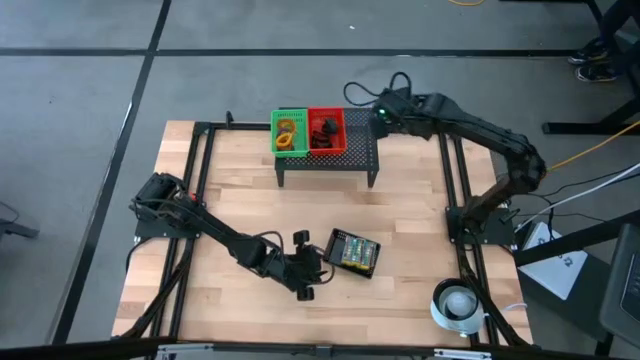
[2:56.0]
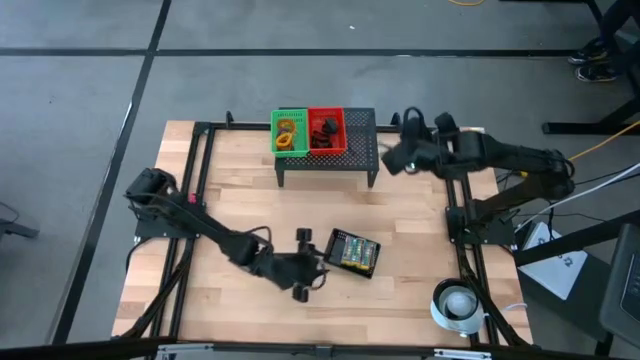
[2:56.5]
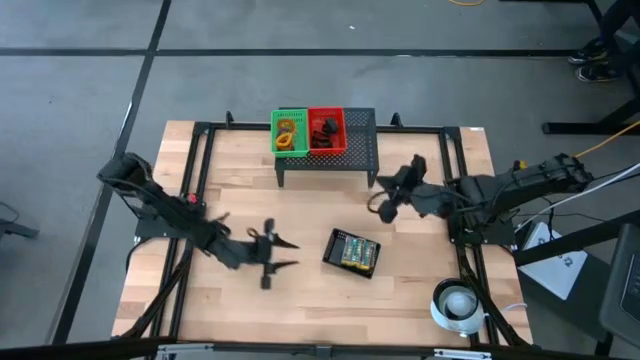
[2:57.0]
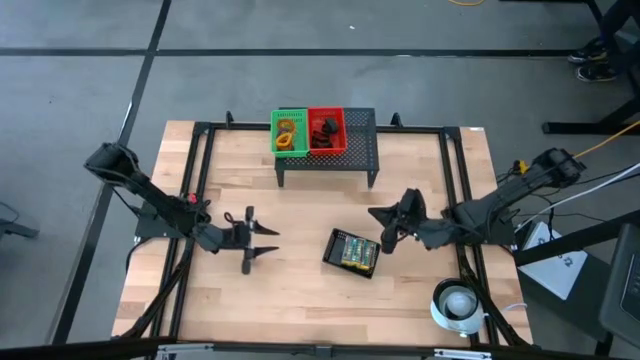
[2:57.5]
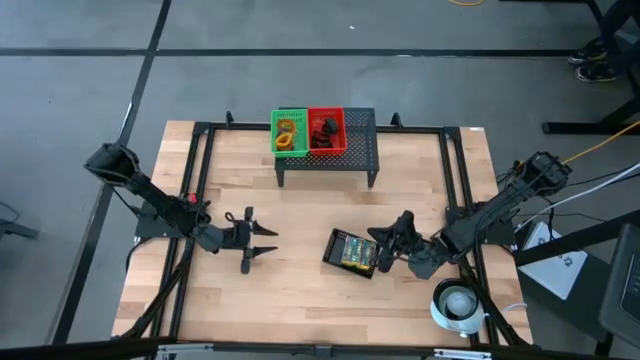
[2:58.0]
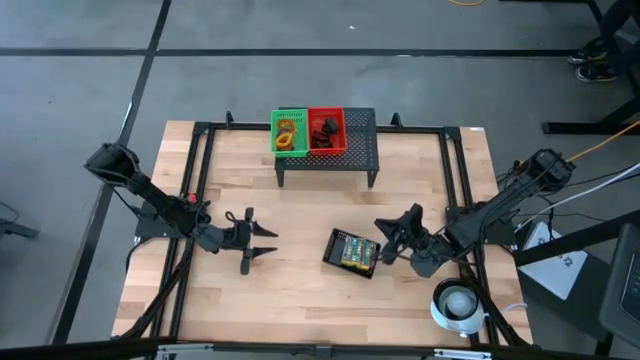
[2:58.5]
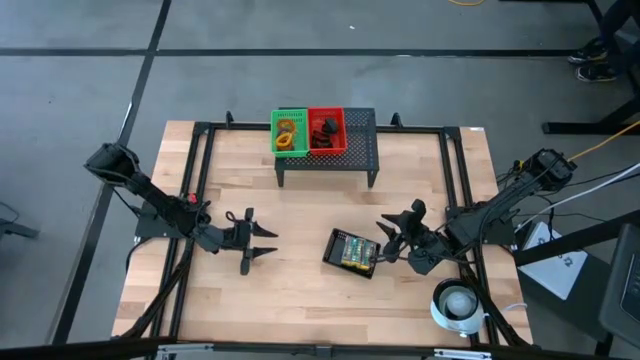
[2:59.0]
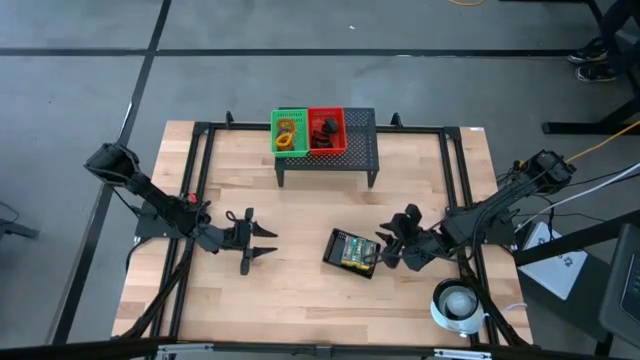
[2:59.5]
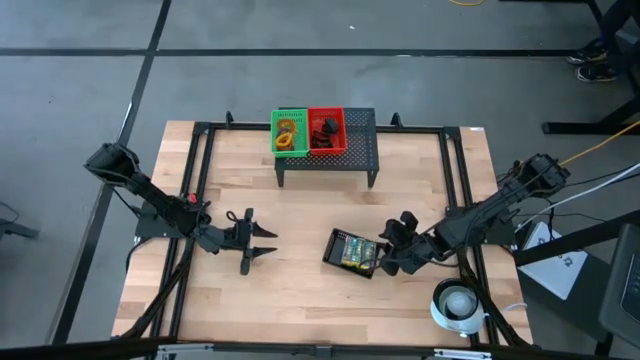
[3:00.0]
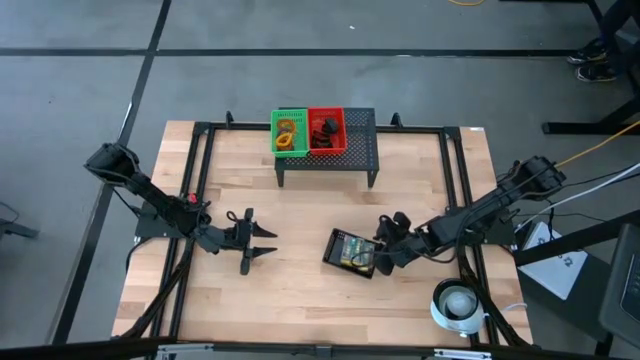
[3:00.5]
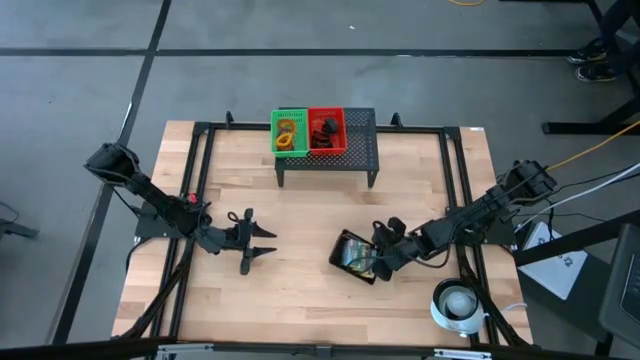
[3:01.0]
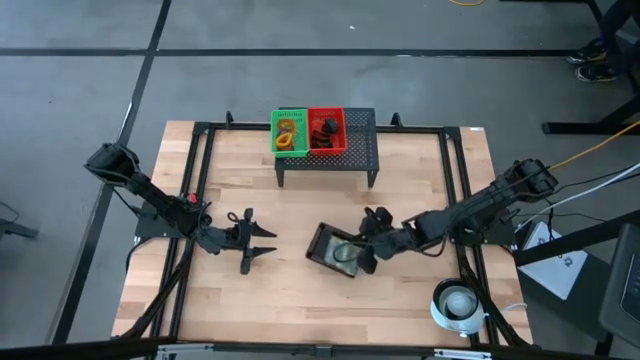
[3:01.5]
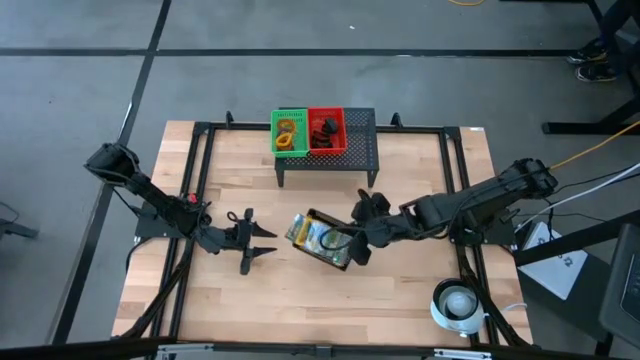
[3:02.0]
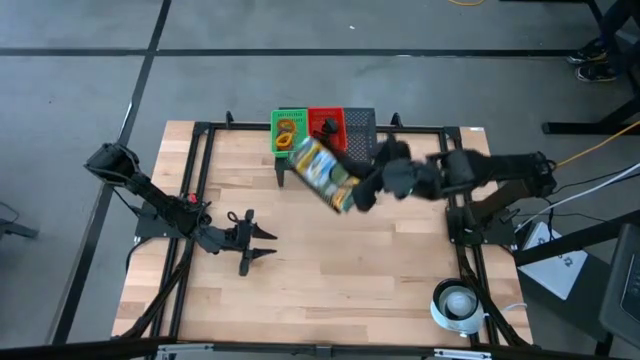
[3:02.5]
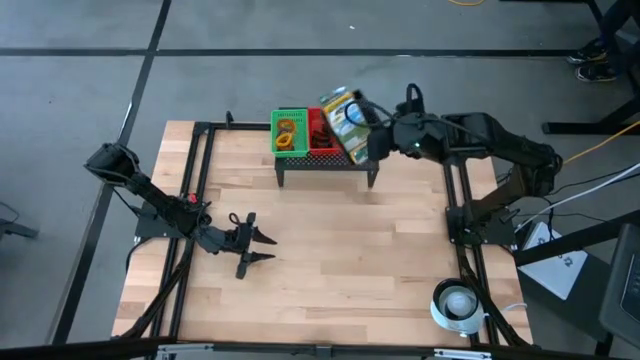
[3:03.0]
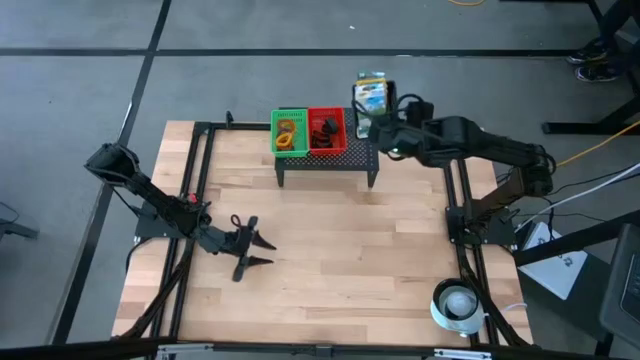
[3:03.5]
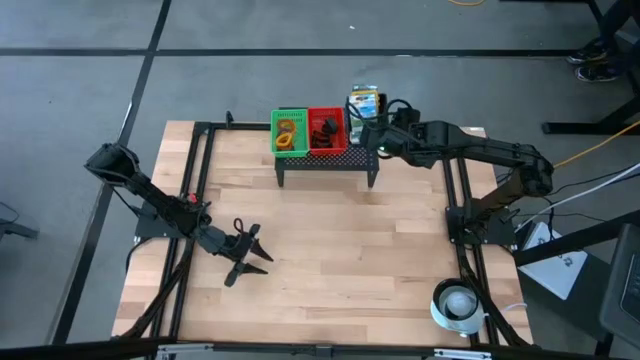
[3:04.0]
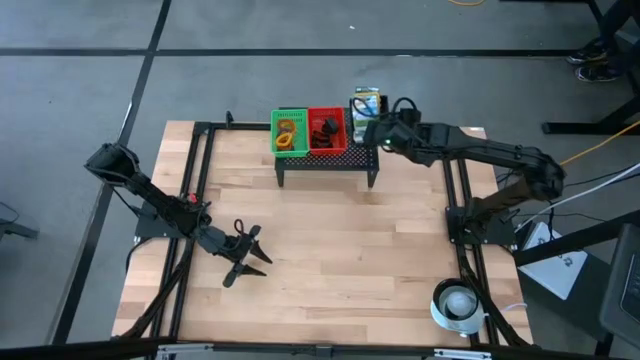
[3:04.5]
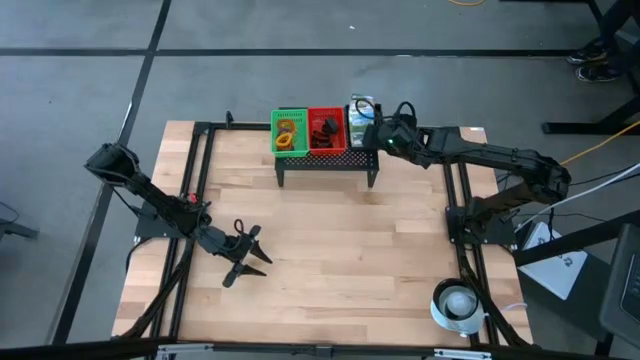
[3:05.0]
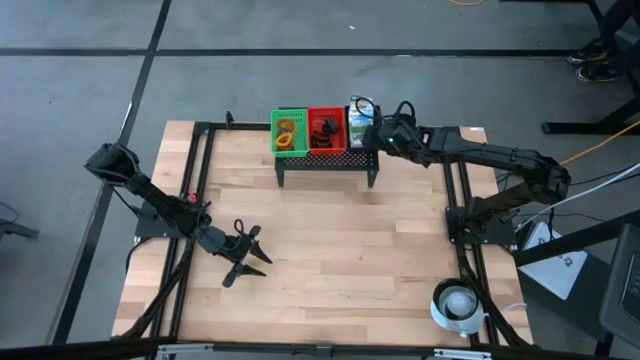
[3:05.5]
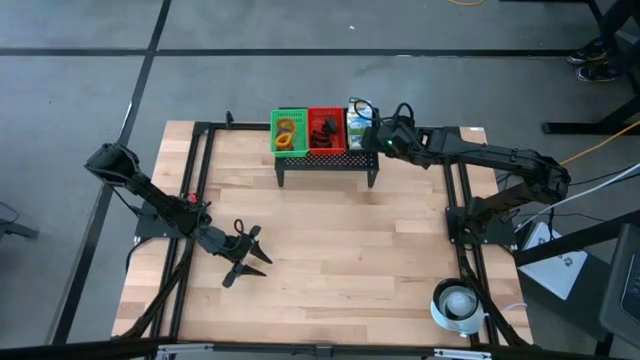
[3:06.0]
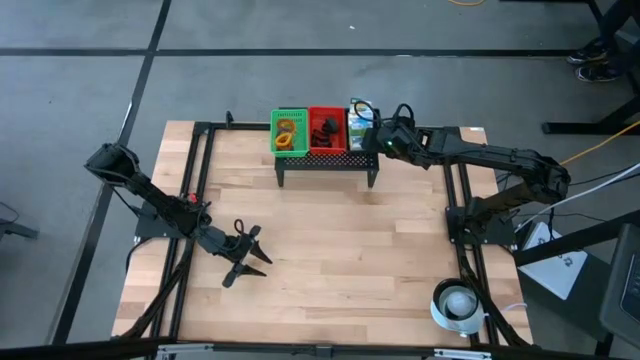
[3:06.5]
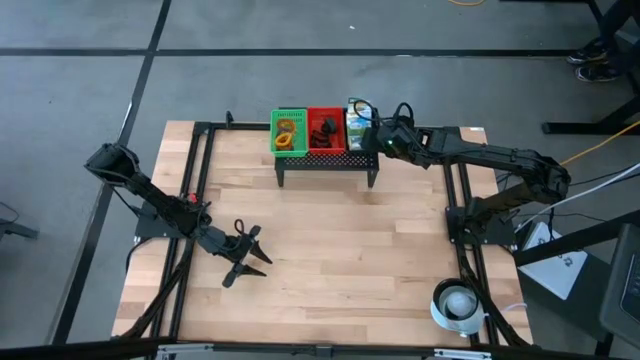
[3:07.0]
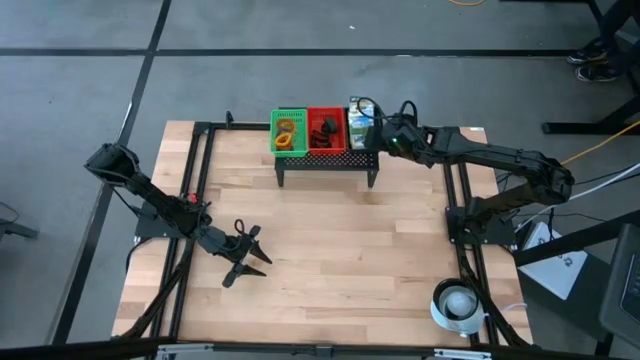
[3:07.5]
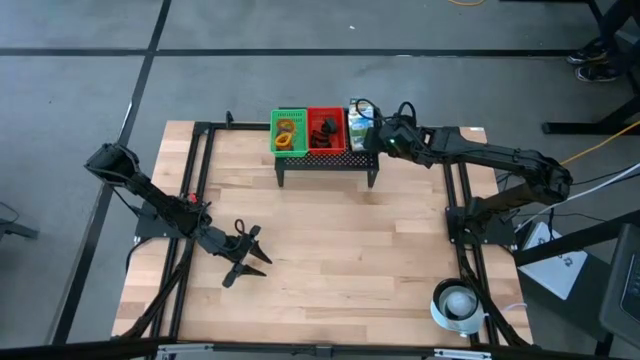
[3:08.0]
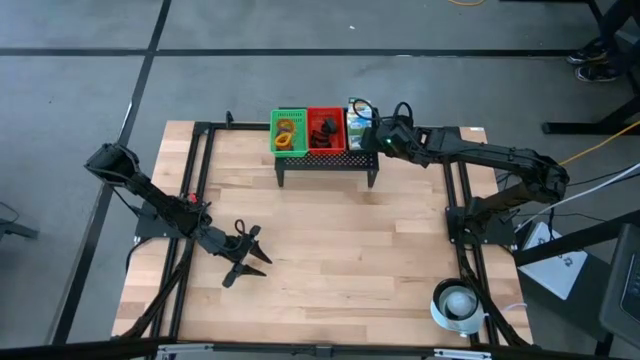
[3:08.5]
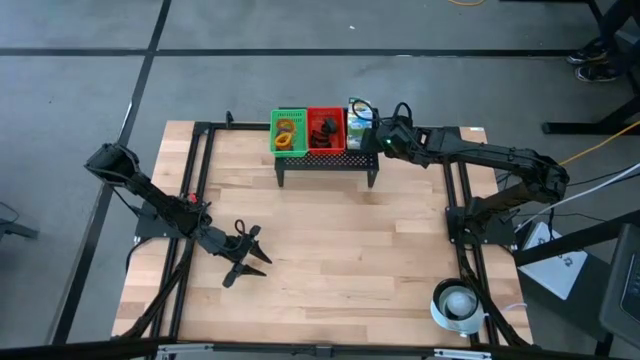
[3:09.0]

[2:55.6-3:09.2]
Task: Pick & Place Office Desk Supplies
Put the black bin on the shelf

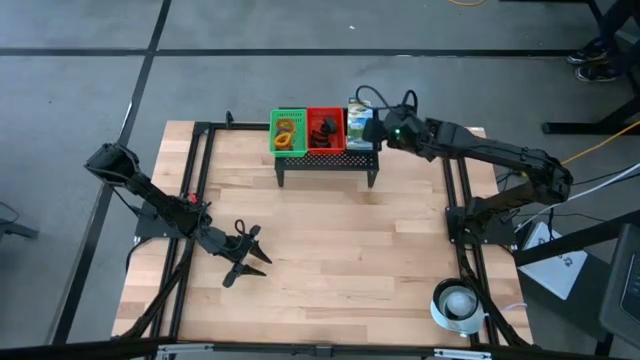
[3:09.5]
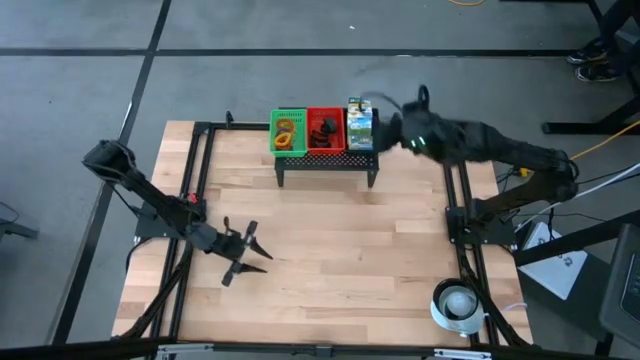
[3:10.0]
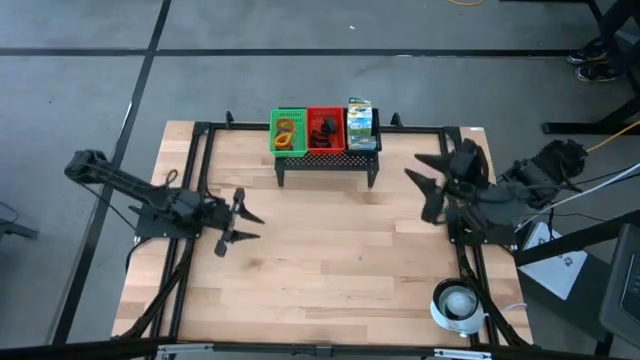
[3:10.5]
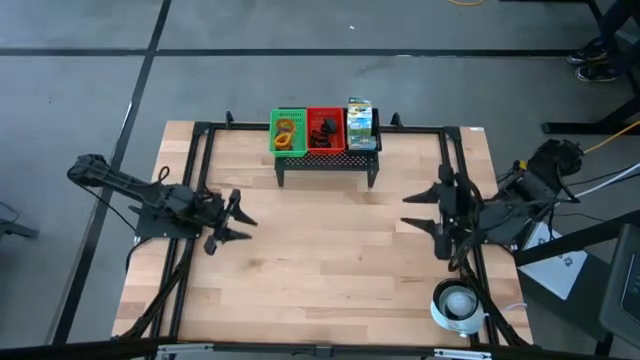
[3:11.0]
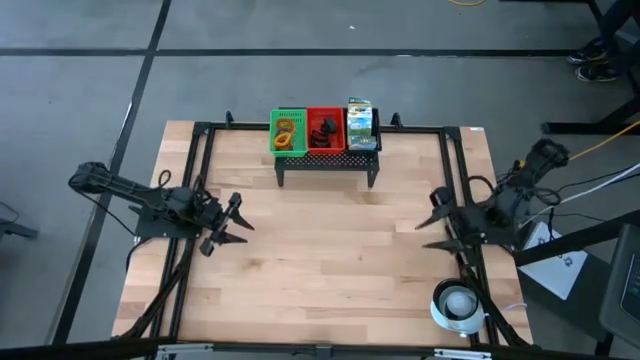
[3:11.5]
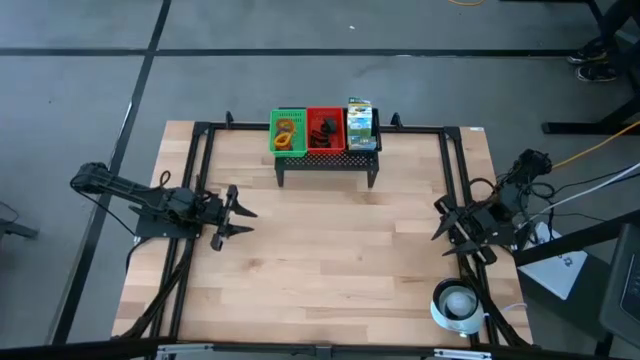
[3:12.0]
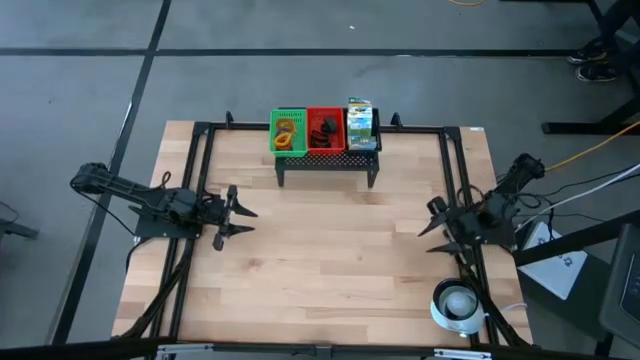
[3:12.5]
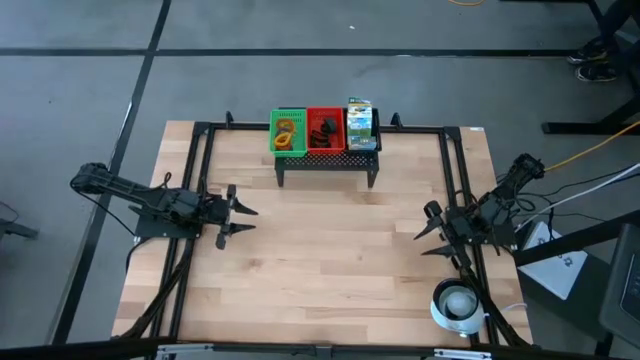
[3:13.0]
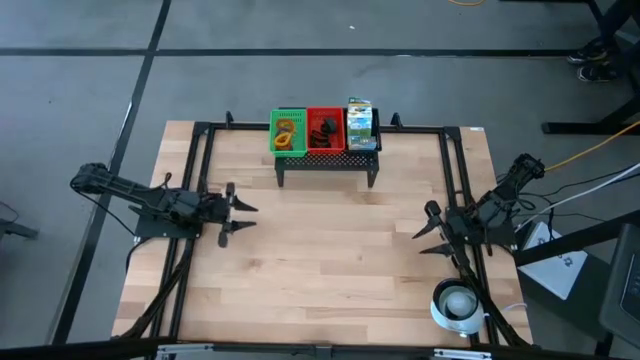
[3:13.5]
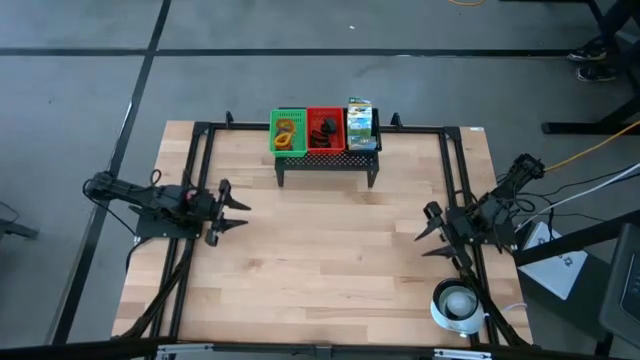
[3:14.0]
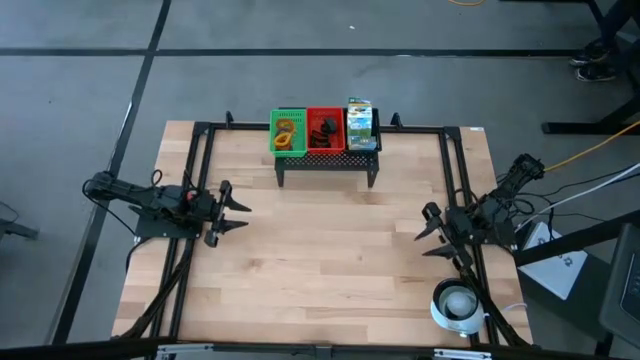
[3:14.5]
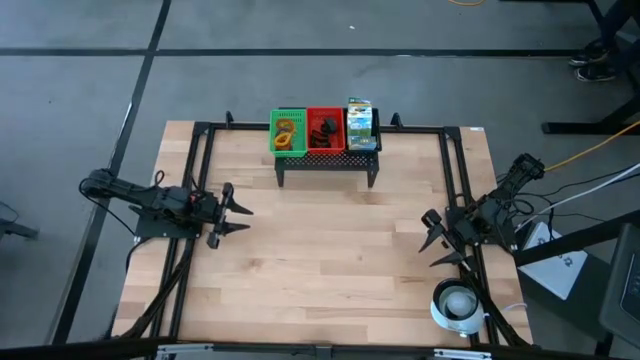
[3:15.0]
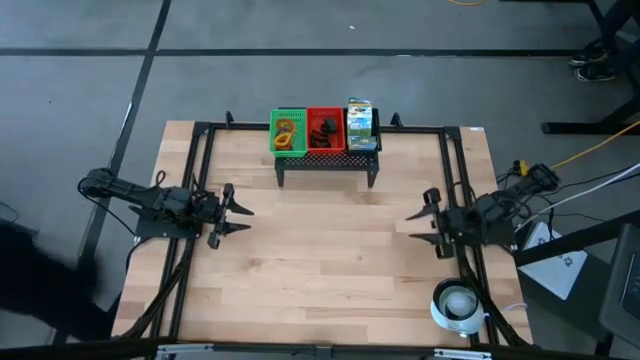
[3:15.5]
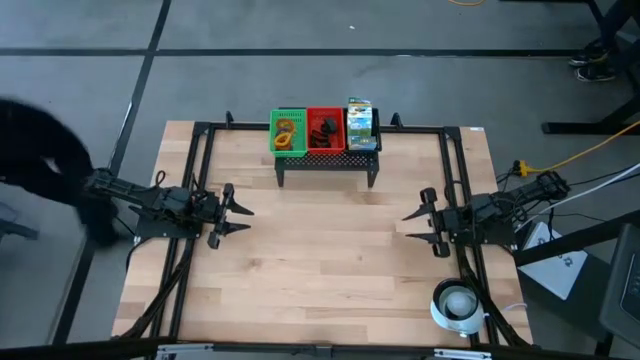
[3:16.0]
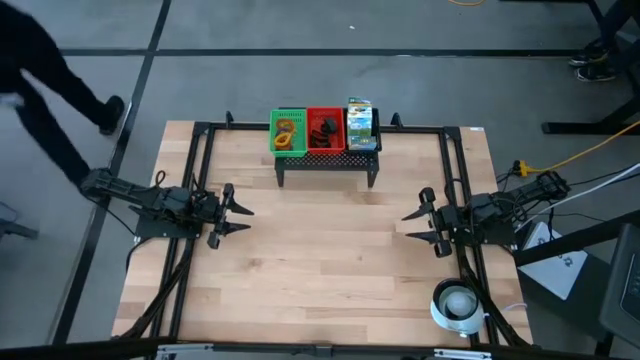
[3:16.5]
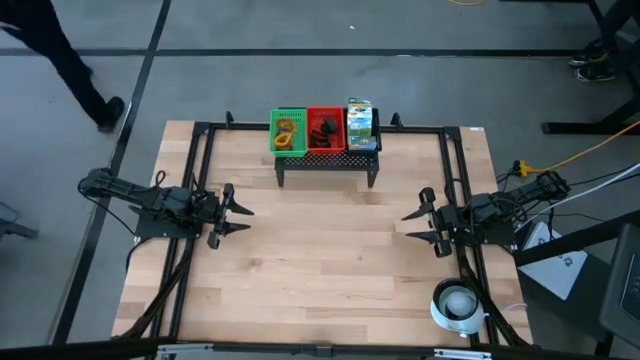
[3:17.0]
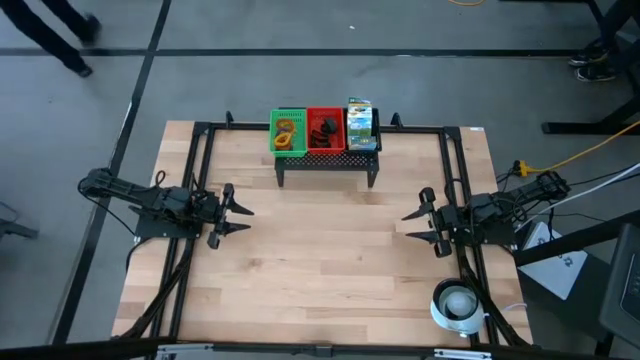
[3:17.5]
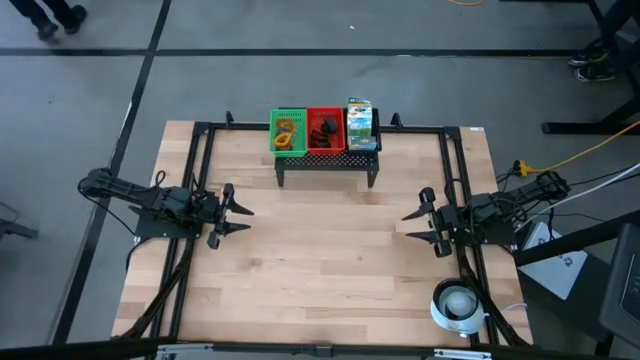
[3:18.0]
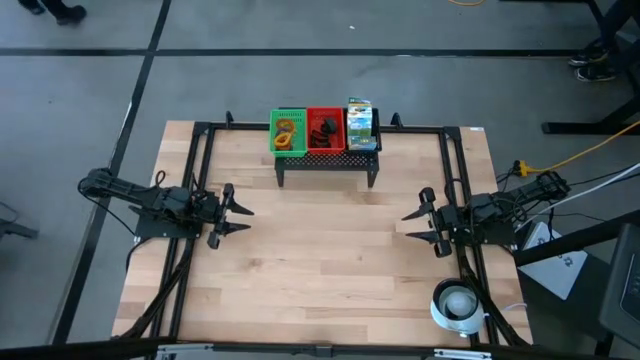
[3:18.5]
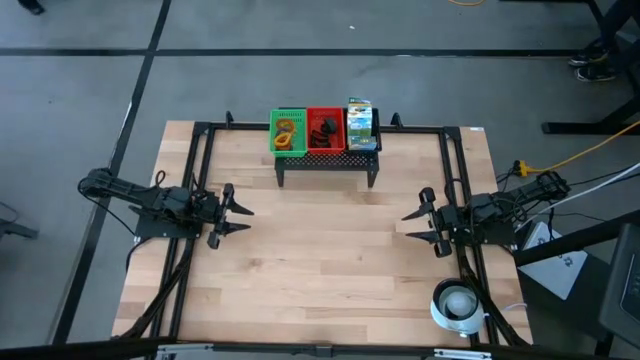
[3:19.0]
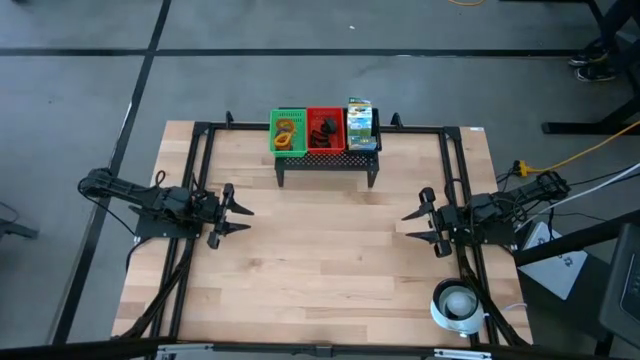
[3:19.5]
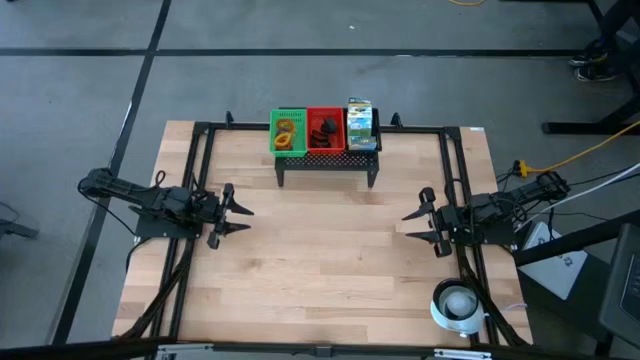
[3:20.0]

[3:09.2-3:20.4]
Return to Home Position
